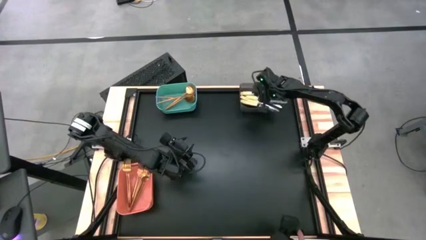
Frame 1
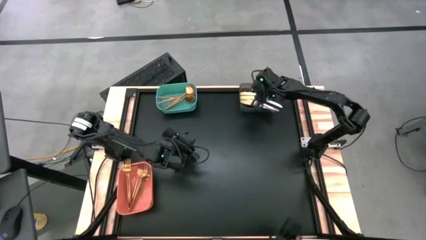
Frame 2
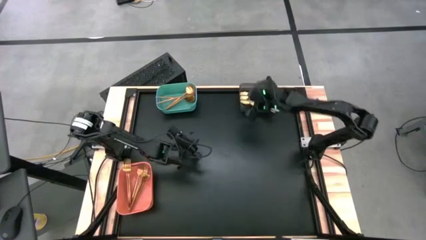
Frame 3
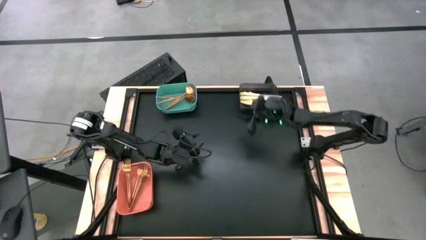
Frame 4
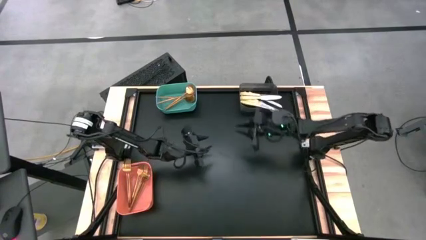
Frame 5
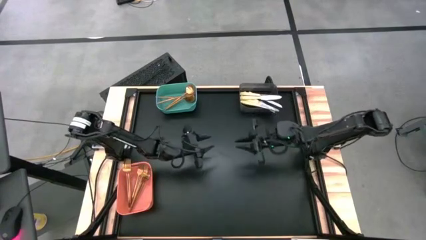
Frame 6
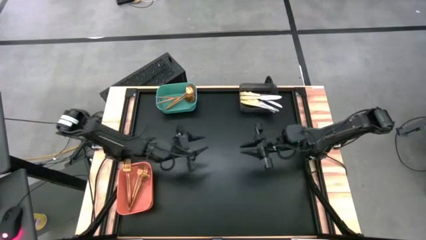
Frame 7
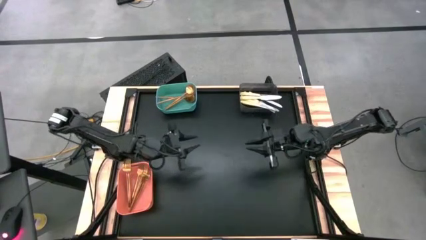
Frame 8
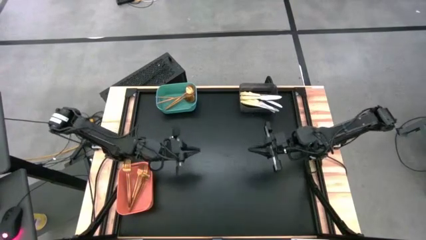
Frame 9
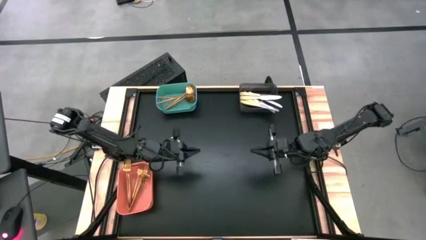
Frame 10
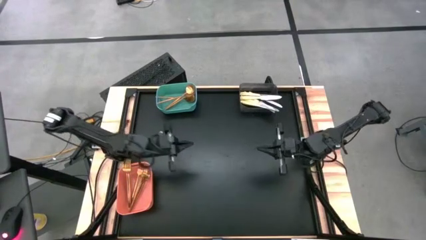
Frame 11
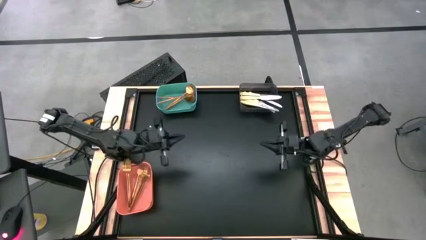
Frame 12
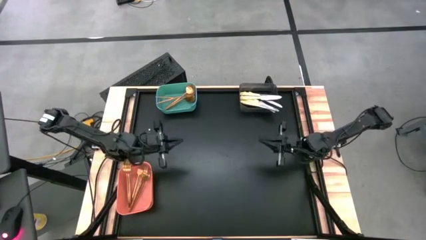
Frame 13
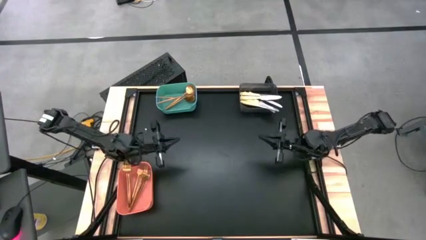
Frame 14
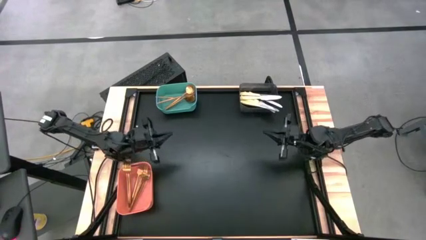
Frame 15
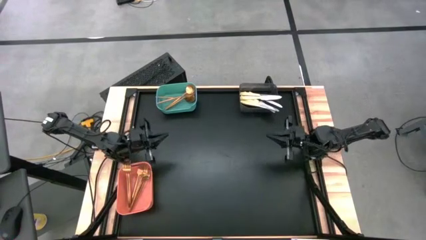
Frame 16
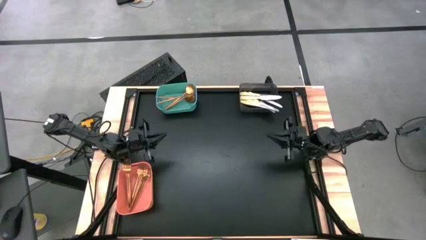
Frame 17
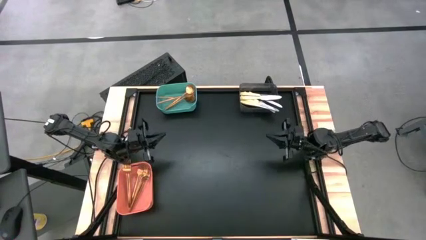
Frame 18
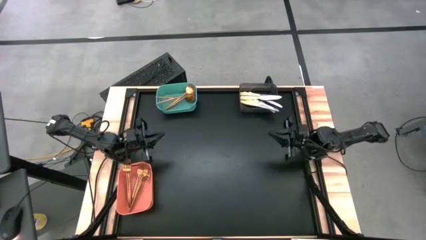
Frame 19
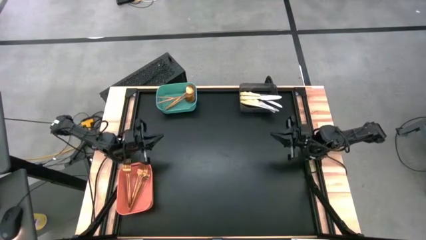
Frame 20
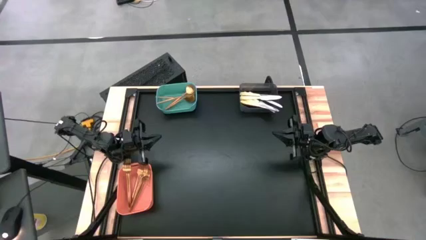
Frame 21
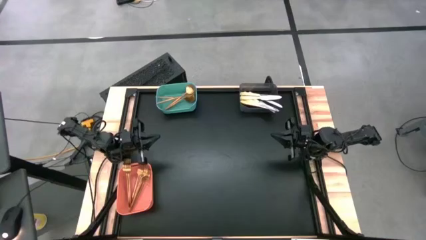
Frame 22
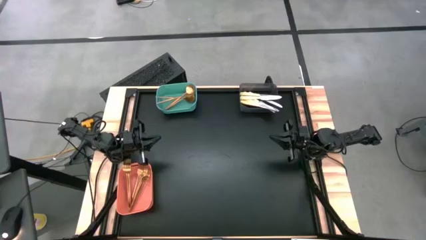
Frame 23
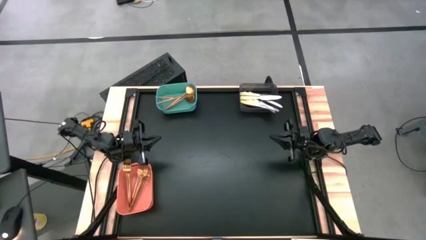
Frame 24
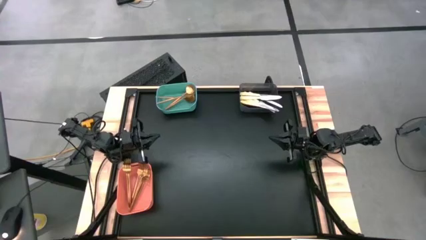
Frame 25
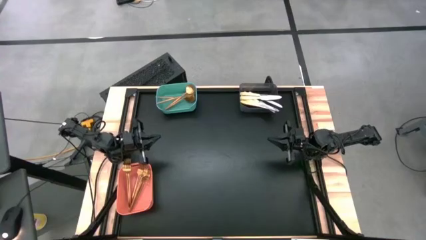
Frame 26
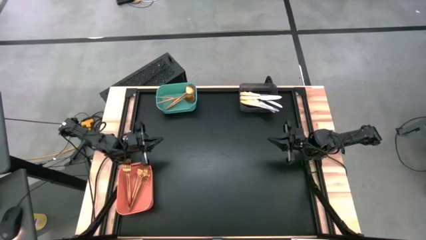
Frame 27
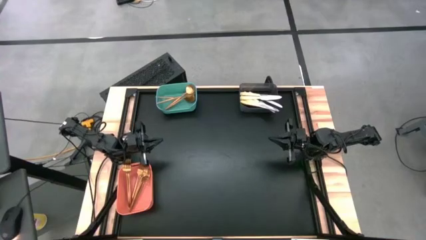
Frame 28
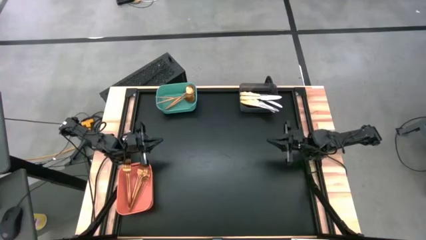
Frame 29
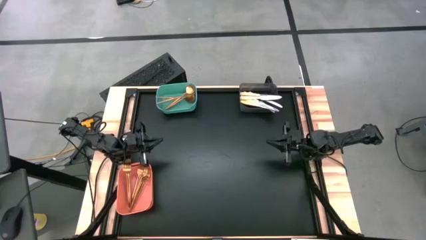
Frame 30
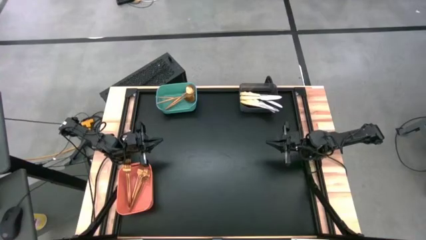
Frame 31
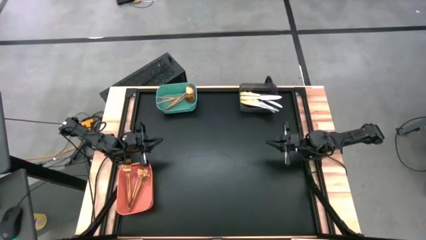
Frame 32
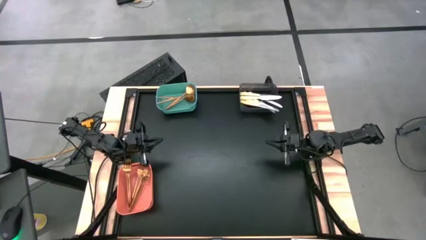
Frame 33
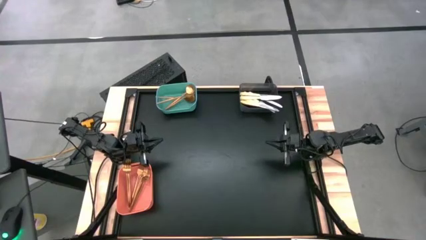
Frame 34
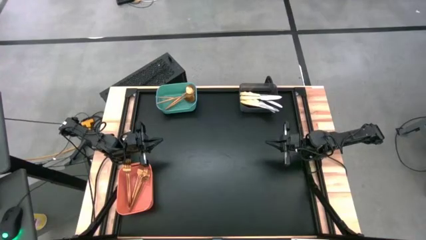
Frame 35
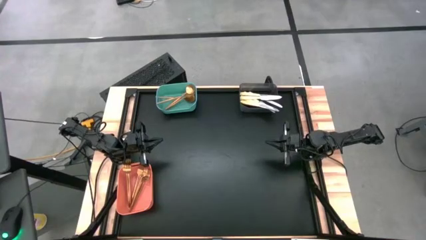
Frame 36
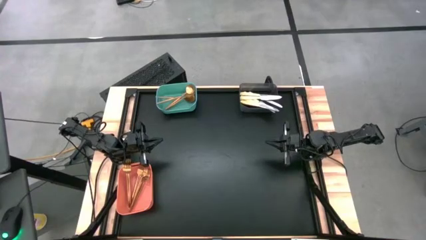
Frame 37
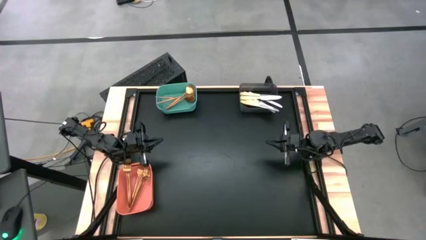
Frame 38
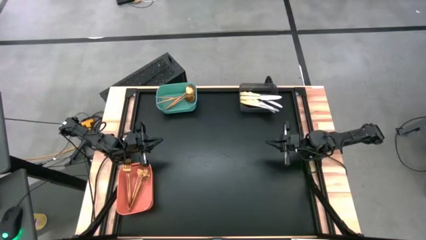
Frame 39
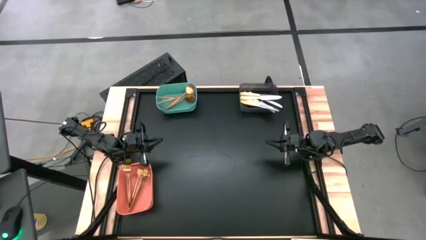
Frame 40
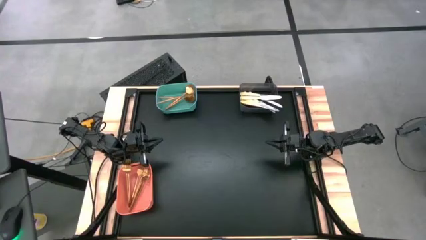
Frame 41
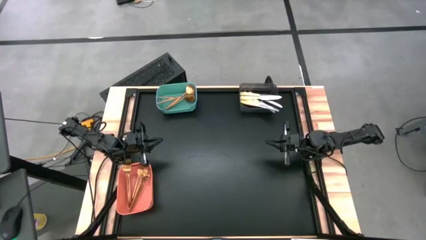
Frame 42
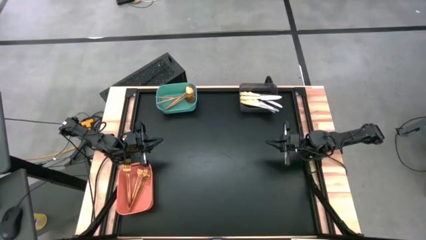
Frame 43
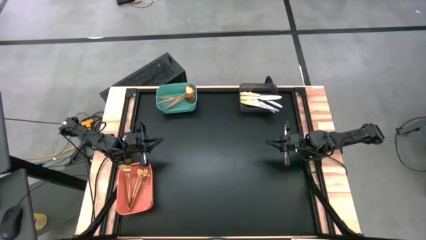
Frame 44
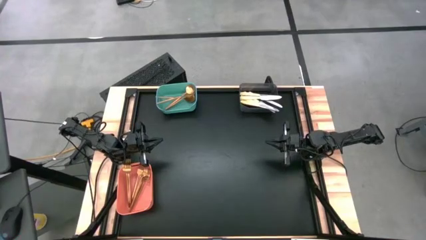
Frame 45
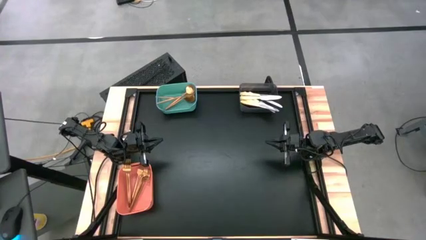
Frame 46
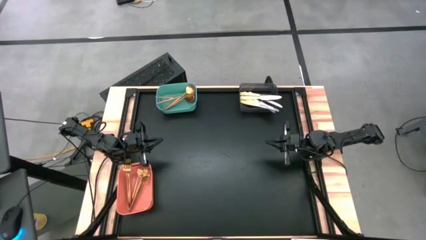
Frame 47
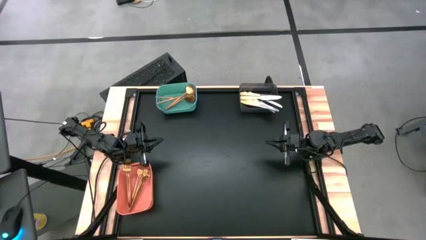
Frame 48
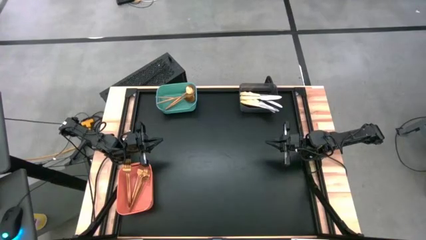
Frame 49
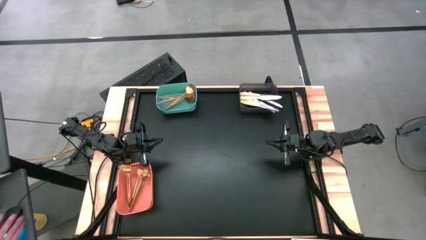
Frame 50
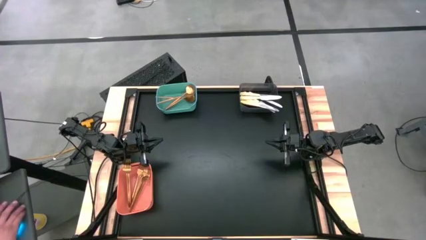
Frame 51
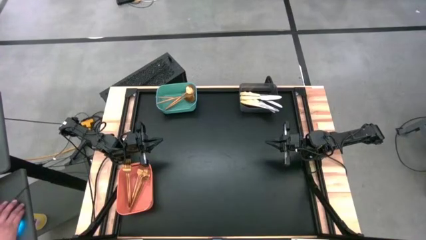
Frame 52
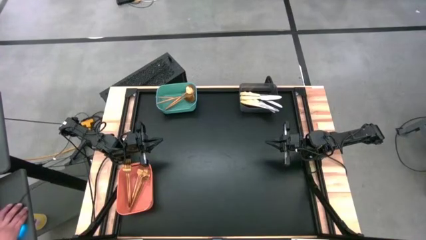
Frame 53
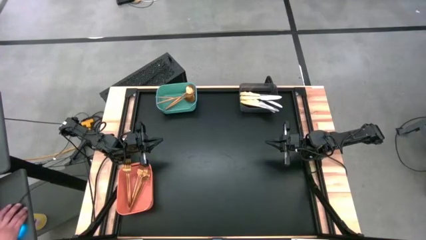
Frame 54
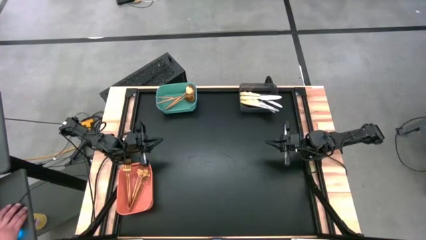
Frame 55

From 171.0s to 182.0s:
Task: Sort silverware by color (type)
Return to Home Position
